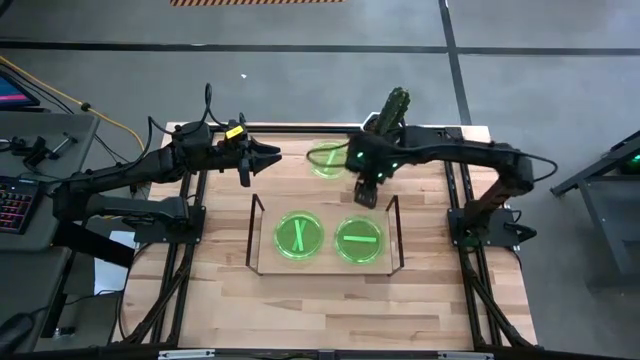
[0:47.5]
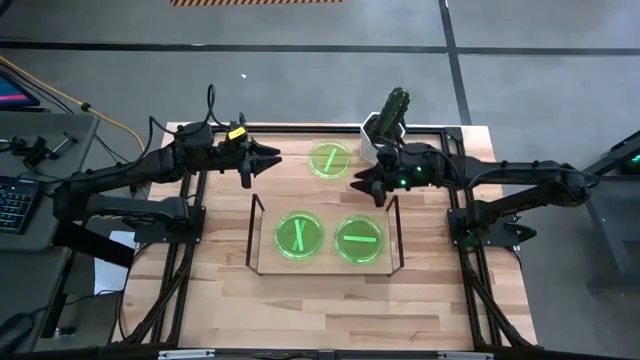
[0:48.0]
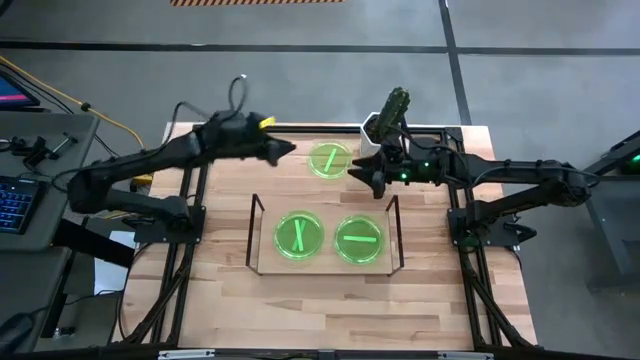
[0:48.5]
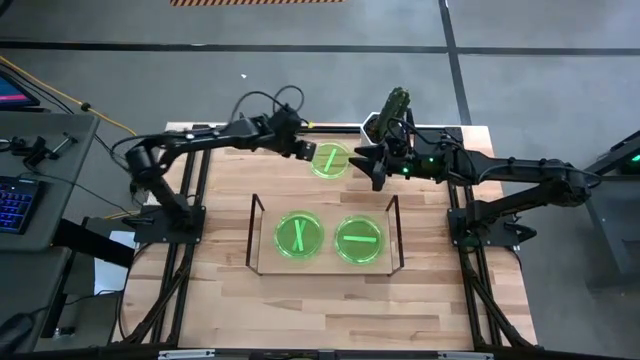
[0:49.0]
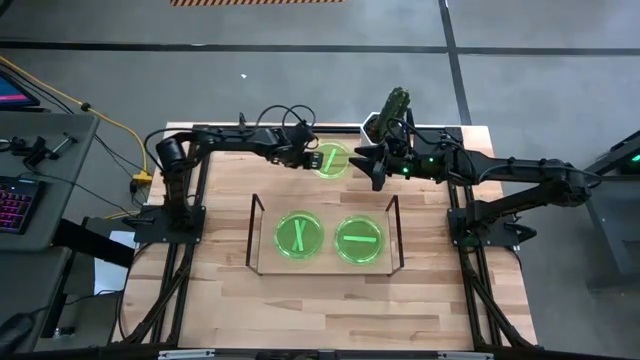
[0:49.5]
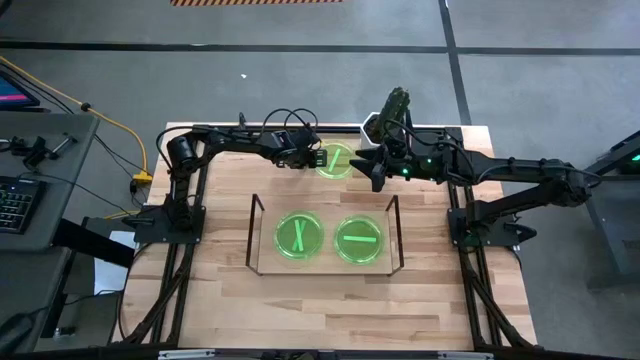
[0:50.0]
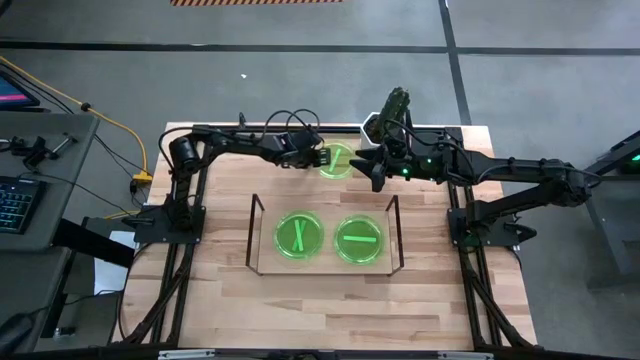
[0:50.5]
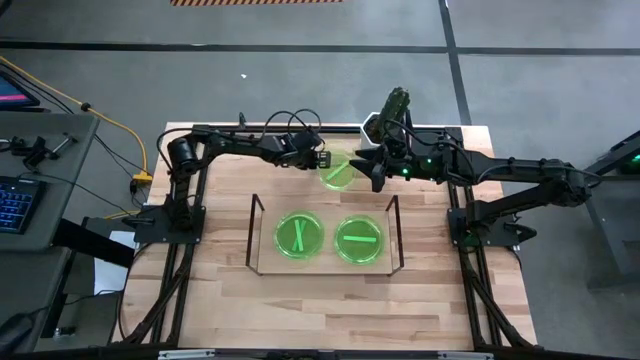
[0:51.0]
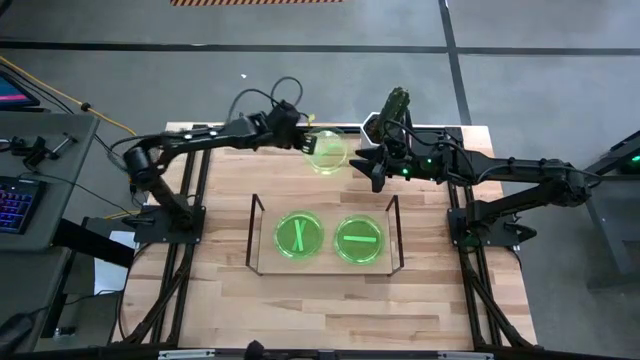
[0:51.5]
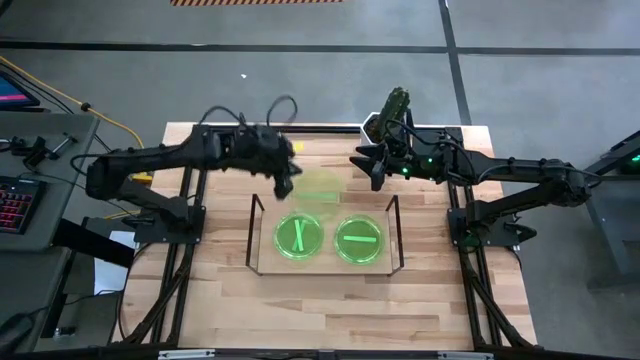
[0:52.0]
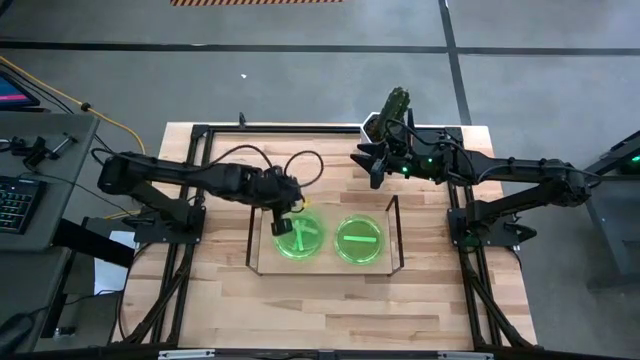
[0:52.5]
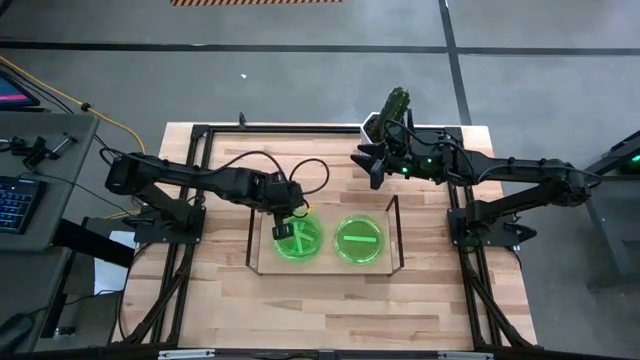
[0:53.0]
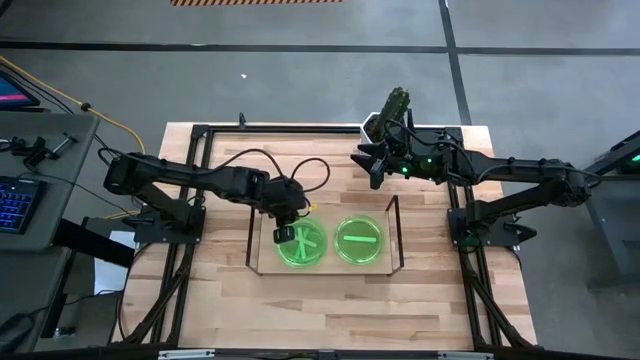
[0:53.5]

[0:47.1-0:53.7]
Task: Place and stack plates onto a shelf
Stack the green transparent plate on top of the green transparent plate

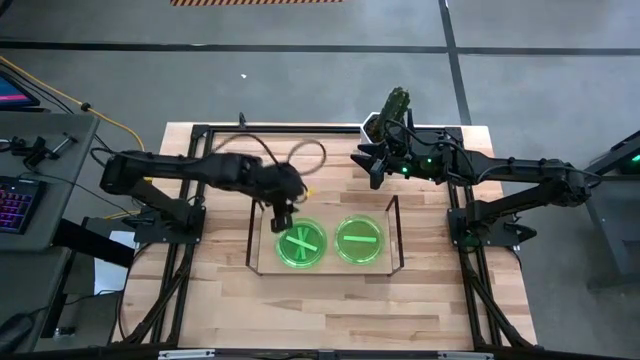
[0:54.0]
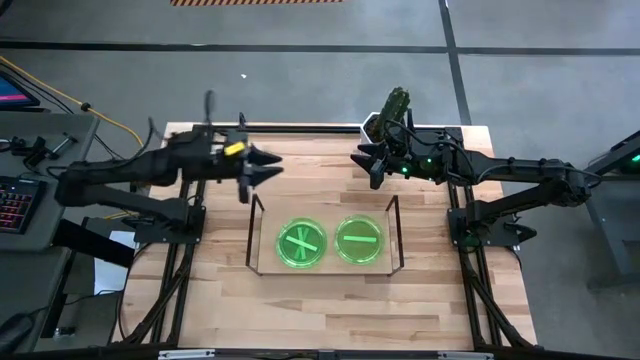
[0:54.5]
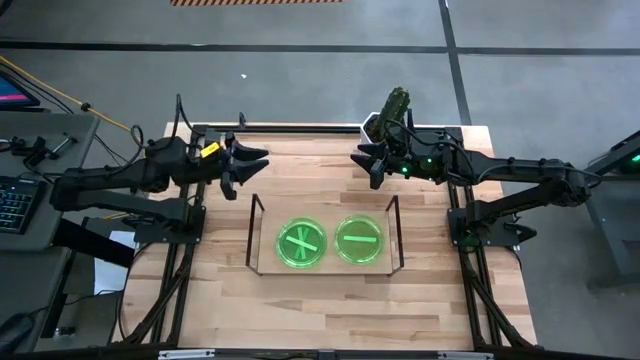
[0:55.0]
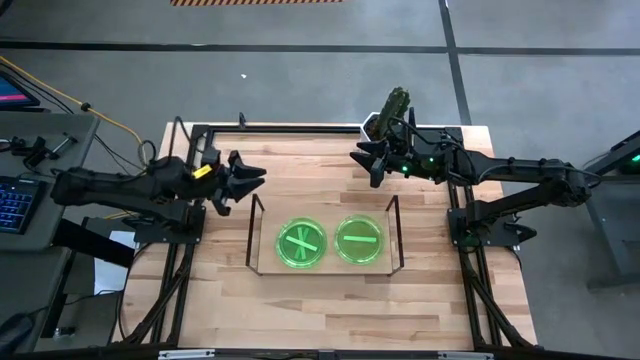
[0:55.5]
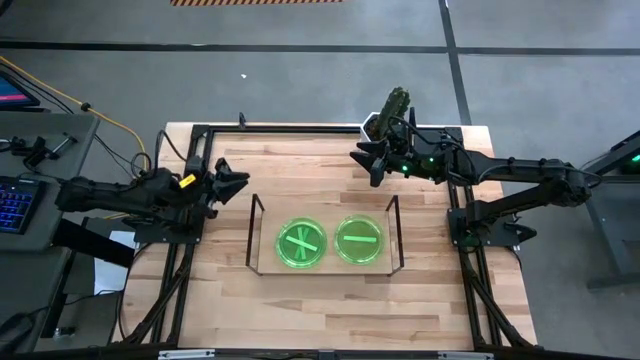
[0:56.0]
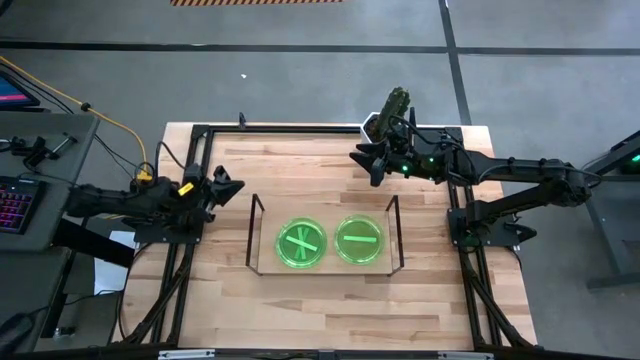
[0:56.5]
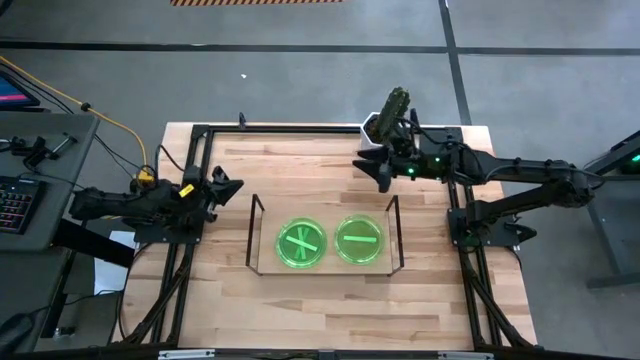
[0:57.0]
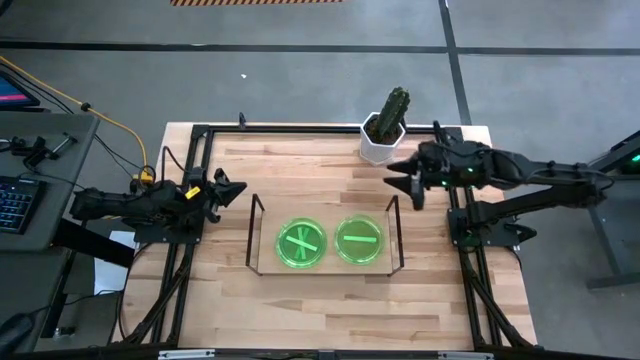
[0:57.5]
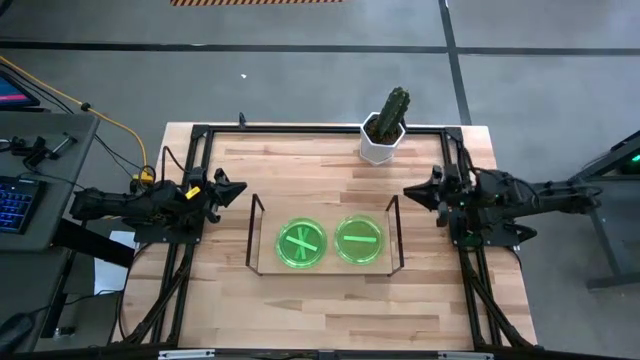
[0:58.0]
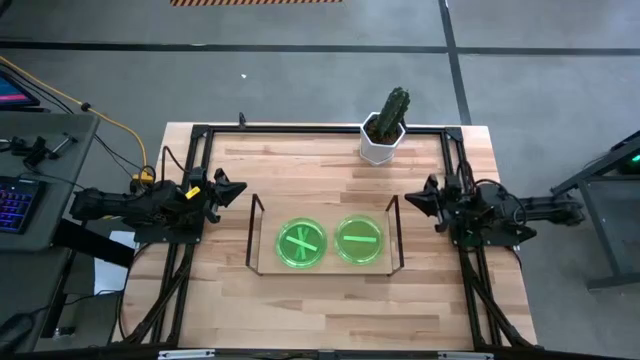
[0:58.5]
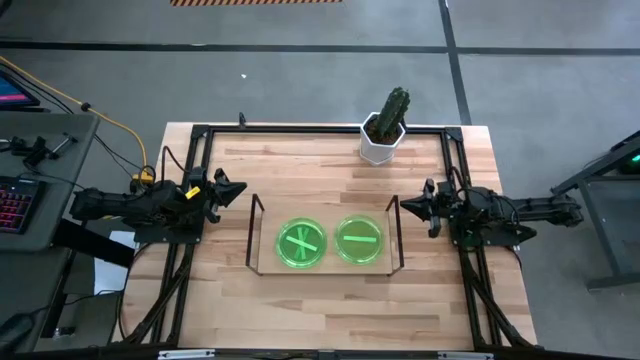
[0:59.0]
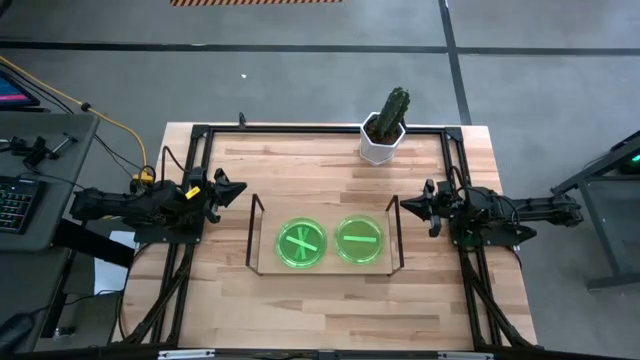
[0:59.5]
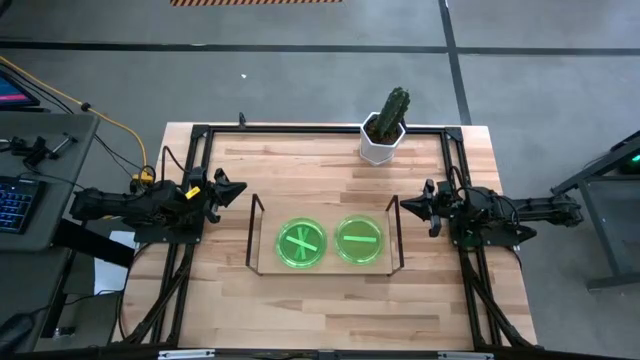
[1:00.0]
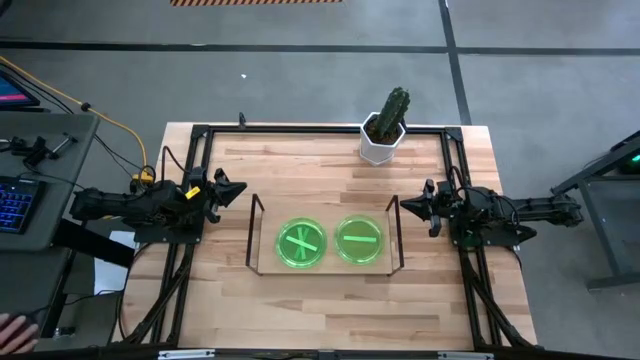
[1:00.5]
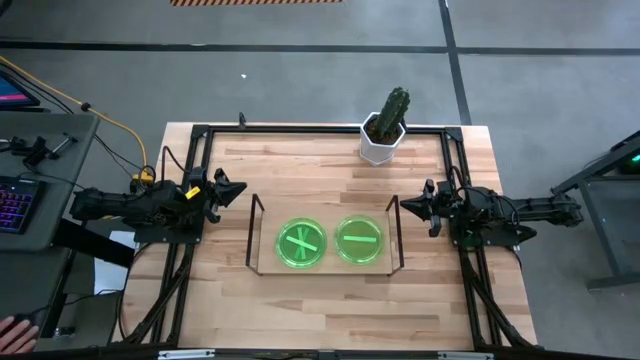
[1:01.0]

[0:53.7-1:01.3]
Return to home position

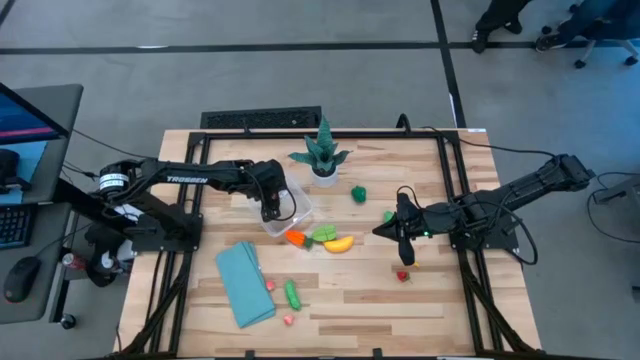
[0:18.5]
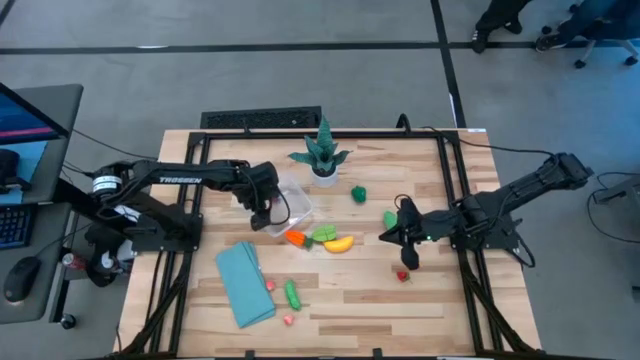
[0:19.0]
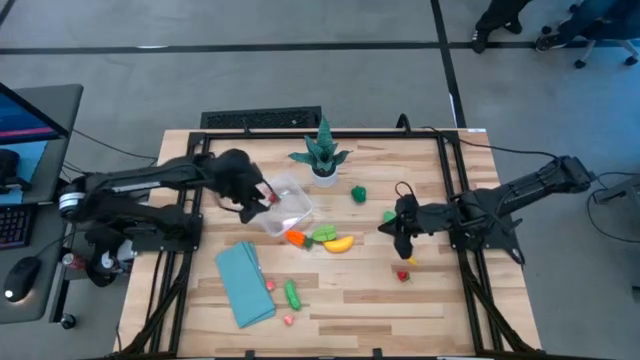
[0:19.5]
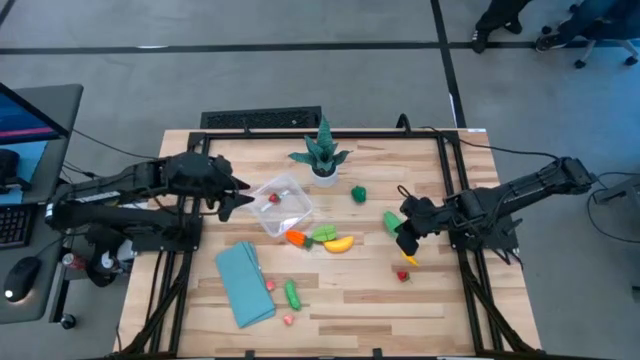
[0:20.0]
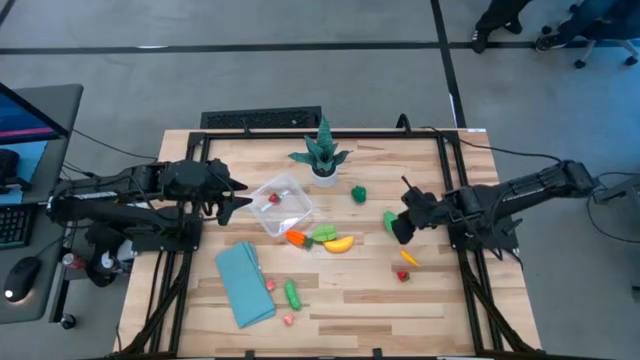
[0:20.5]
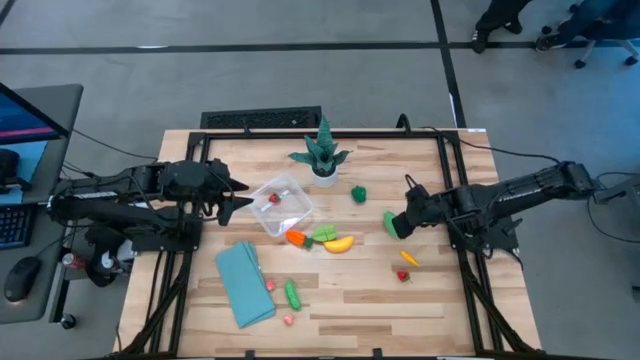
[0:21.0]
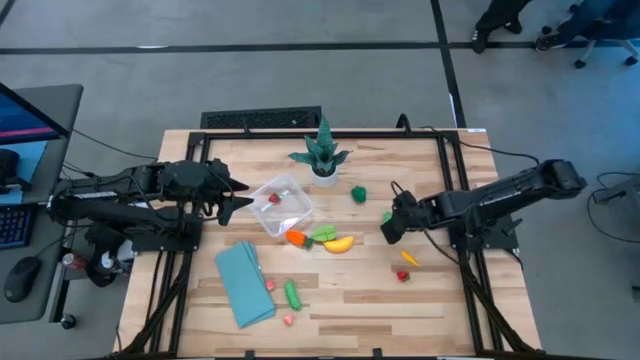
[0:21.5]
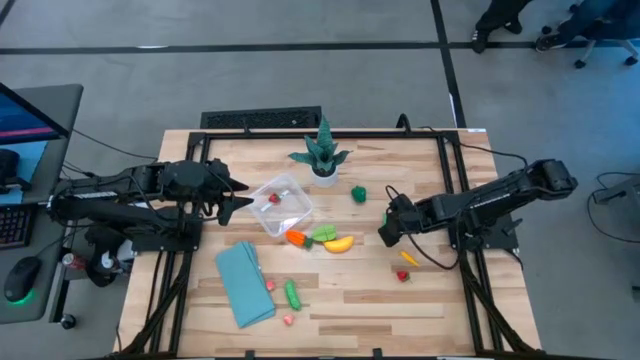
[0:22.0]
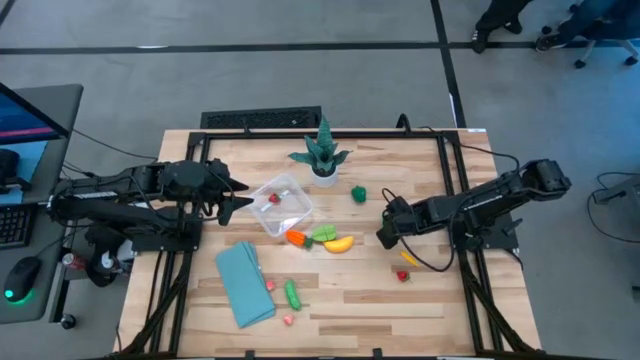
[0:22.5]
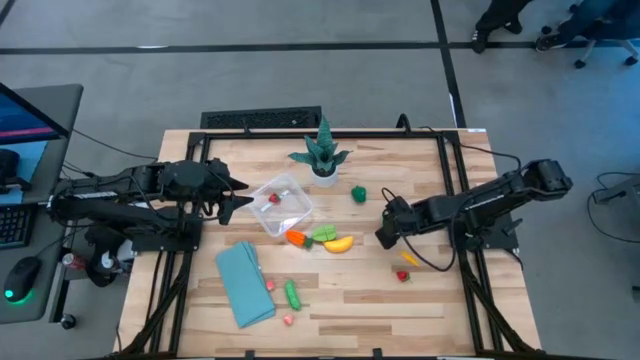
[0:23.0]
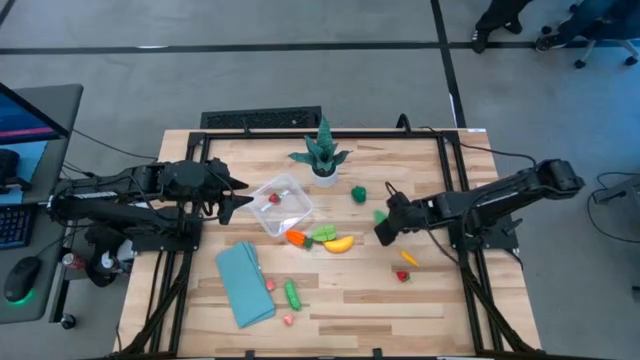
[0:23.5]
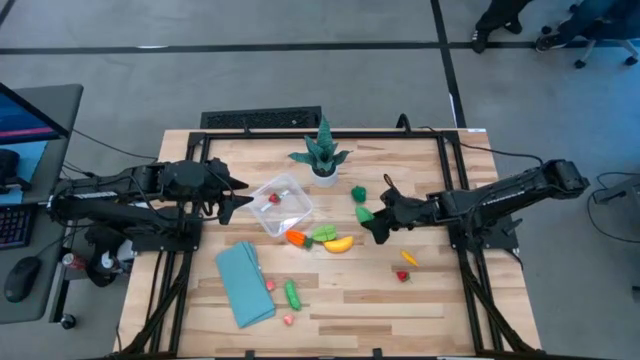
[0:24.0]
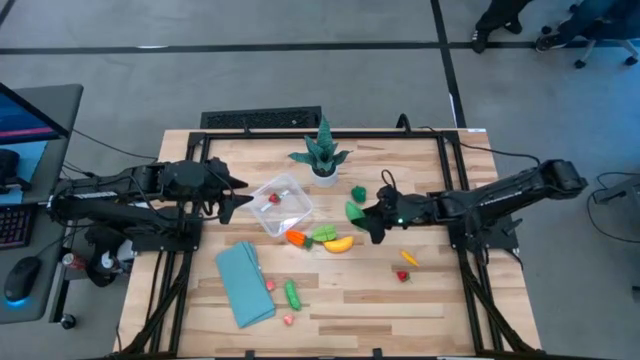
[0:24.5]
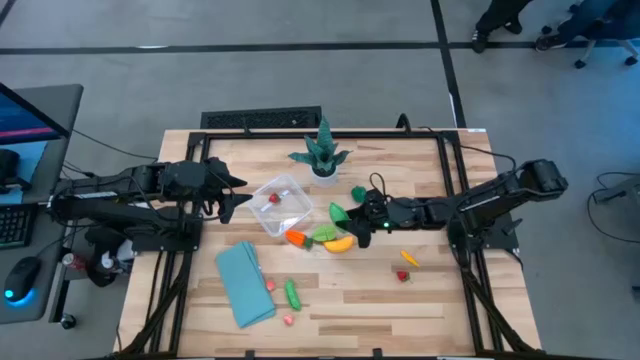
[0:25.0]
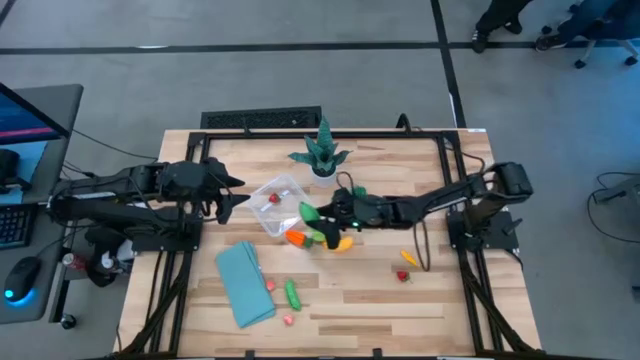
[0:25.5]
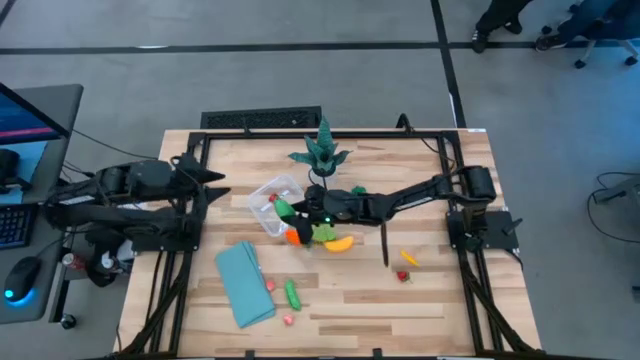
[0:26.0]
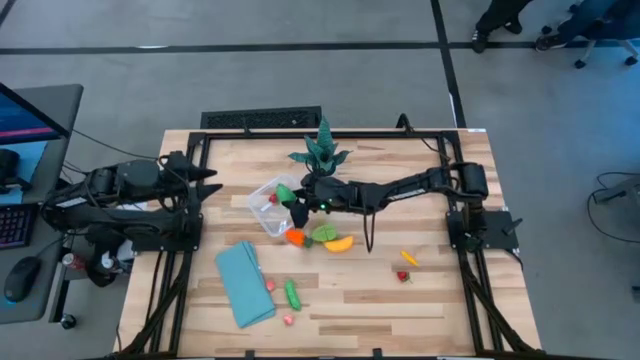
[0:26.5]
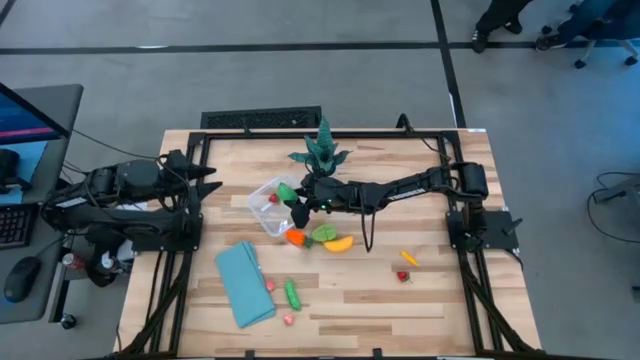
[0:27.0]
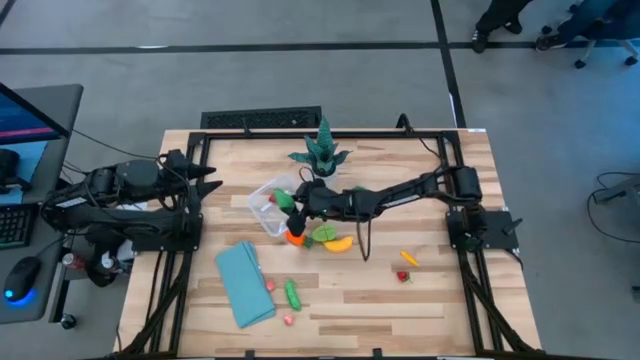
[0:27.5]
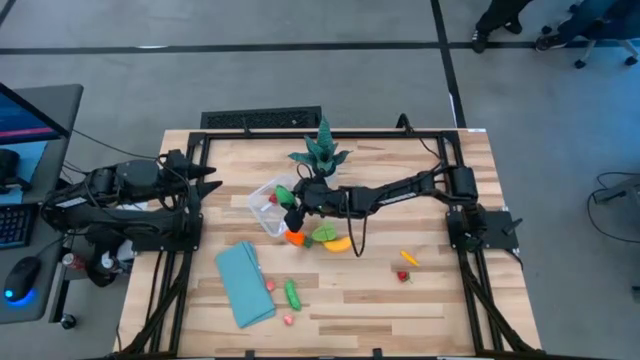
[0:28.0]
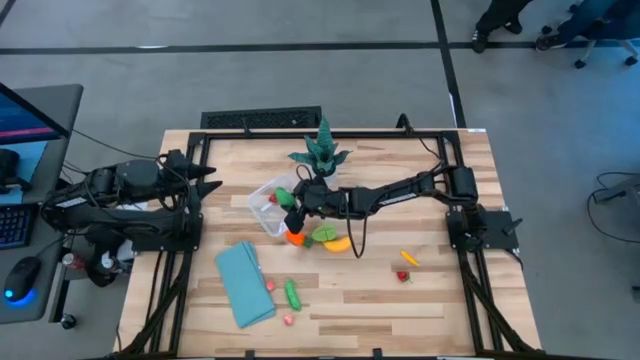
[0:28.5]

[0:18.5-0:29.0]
Task: Pick and placing Produce into tupperware
Put the green corn into the transparent container
